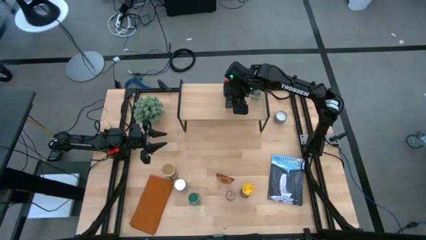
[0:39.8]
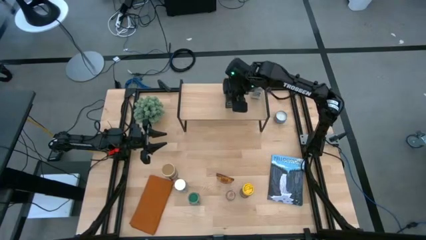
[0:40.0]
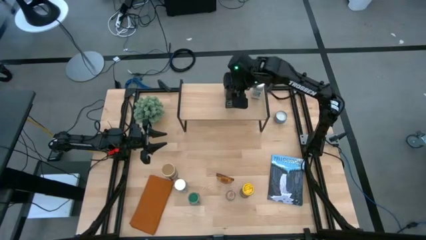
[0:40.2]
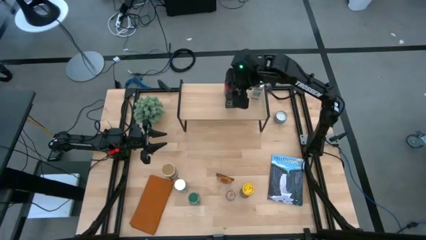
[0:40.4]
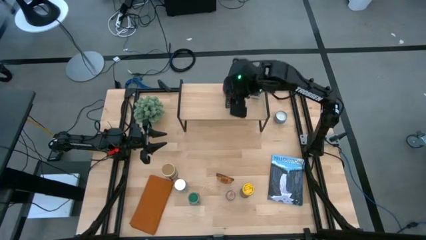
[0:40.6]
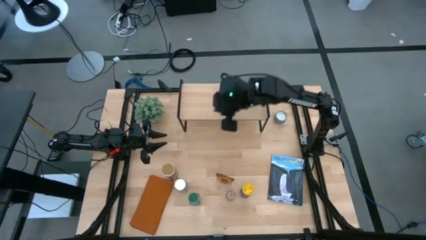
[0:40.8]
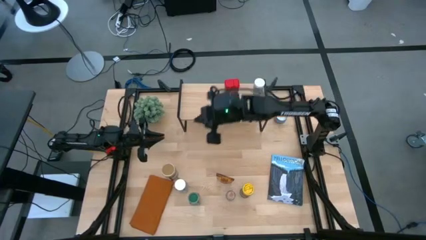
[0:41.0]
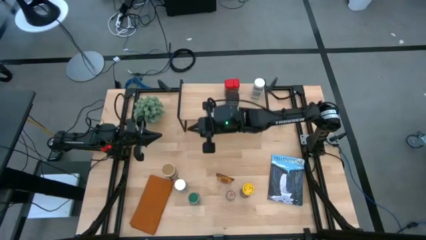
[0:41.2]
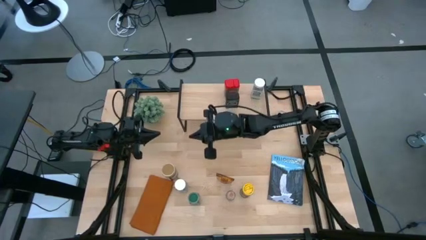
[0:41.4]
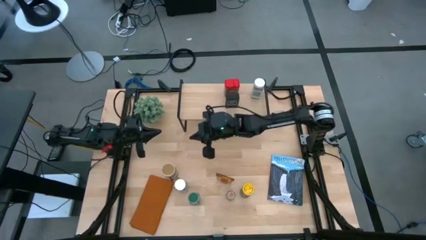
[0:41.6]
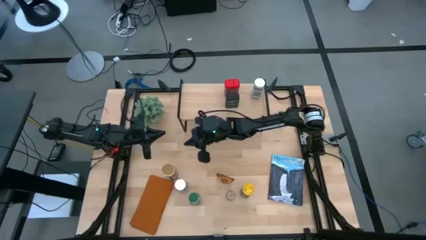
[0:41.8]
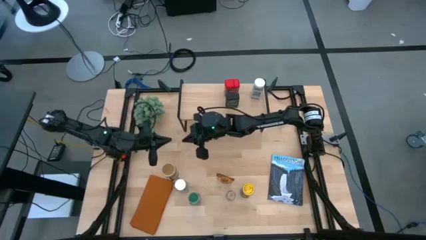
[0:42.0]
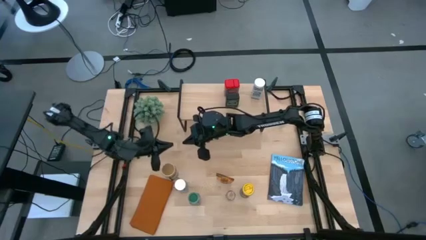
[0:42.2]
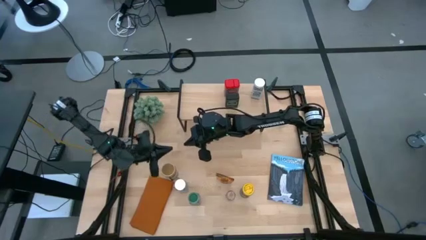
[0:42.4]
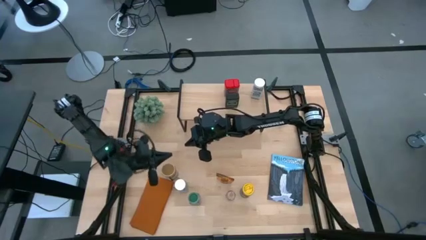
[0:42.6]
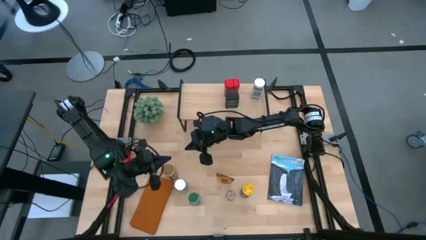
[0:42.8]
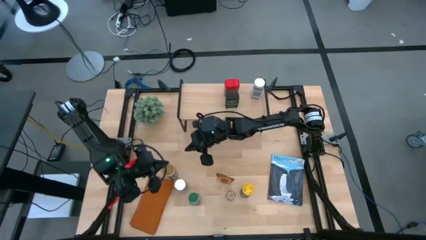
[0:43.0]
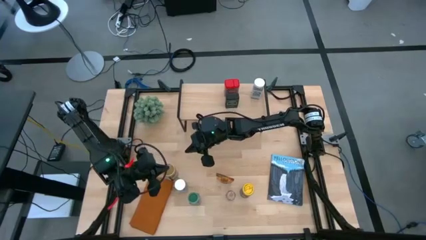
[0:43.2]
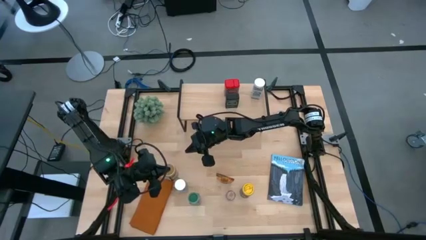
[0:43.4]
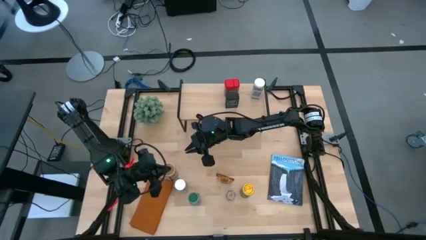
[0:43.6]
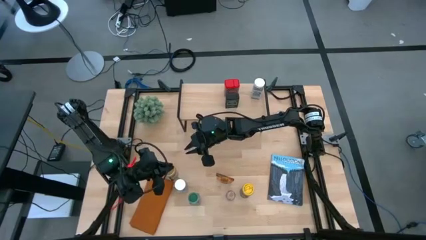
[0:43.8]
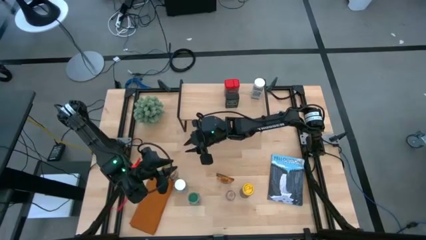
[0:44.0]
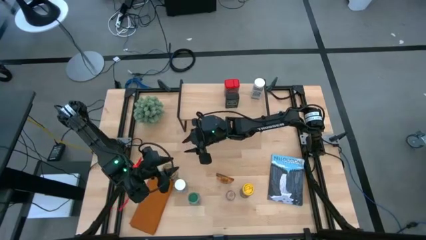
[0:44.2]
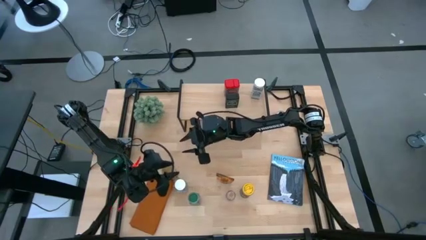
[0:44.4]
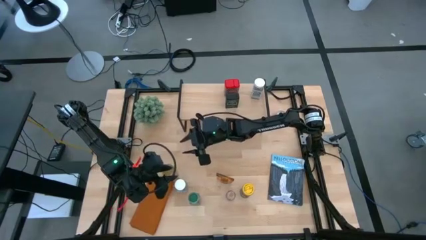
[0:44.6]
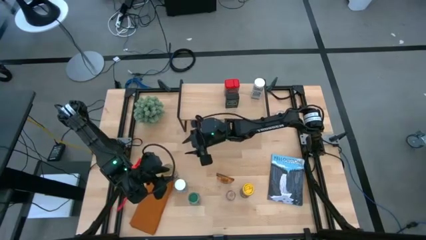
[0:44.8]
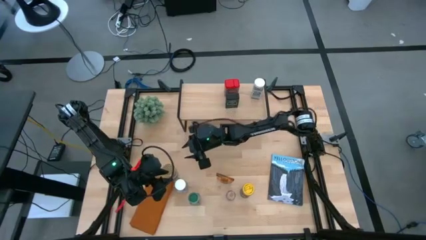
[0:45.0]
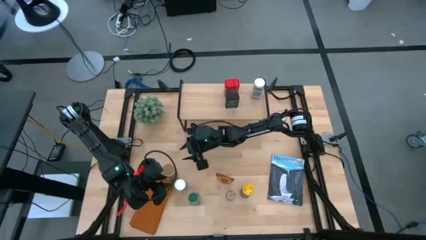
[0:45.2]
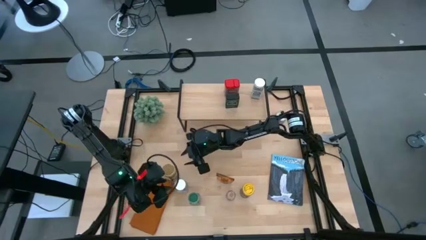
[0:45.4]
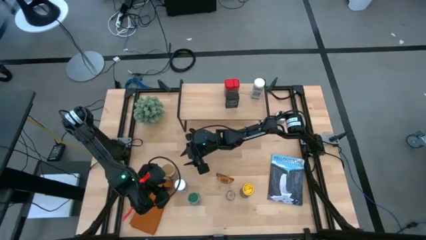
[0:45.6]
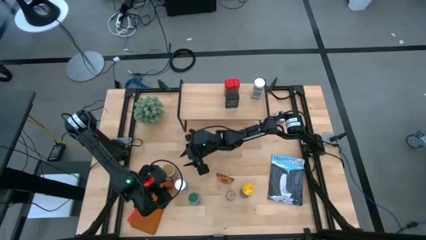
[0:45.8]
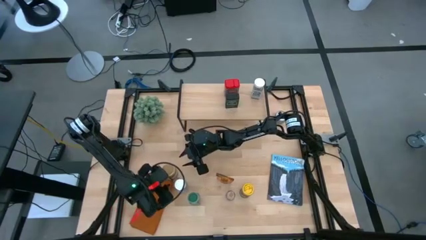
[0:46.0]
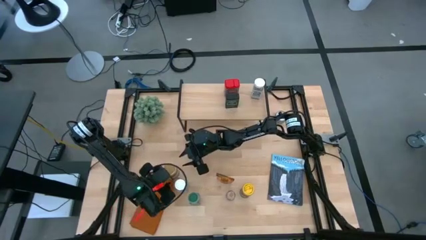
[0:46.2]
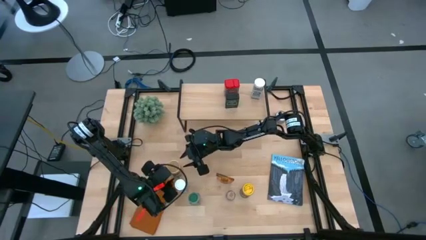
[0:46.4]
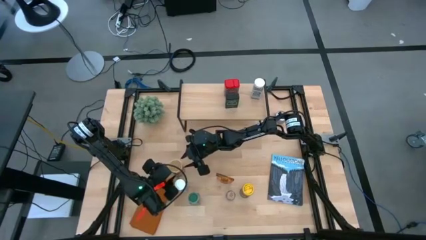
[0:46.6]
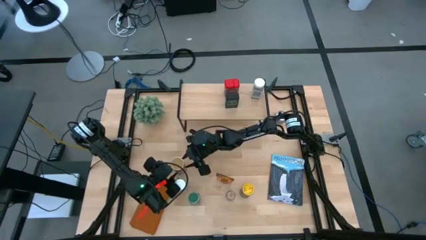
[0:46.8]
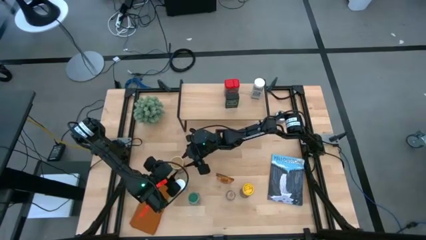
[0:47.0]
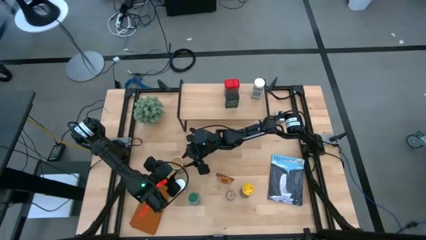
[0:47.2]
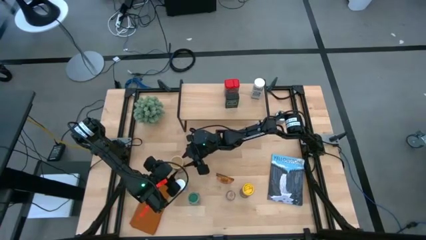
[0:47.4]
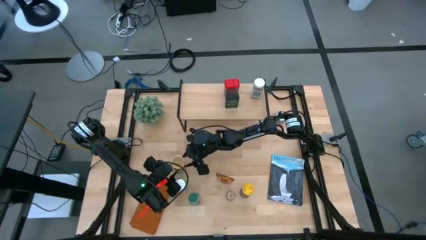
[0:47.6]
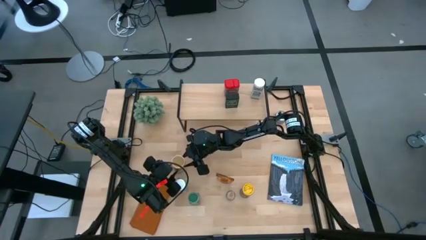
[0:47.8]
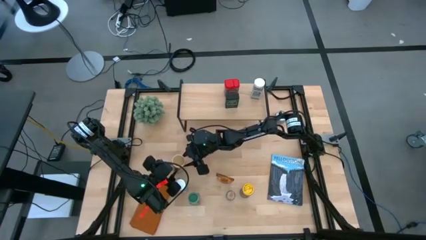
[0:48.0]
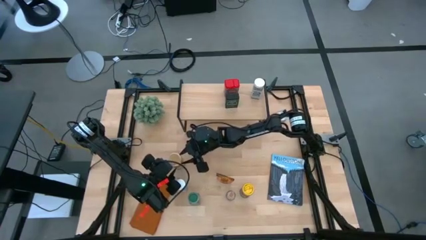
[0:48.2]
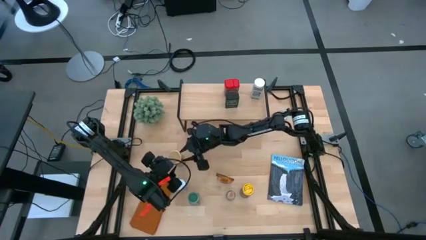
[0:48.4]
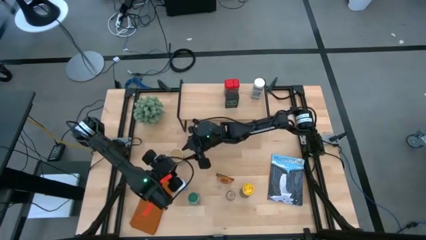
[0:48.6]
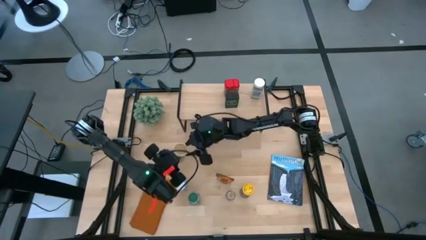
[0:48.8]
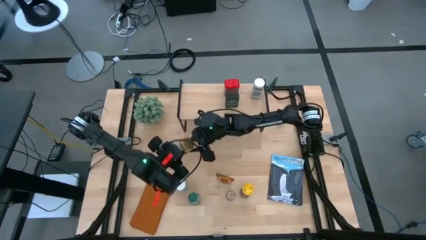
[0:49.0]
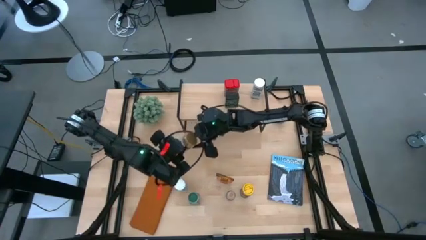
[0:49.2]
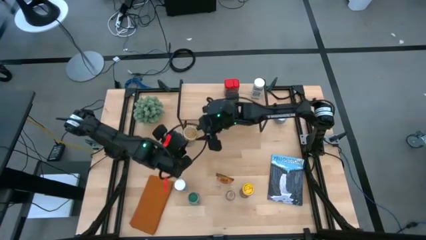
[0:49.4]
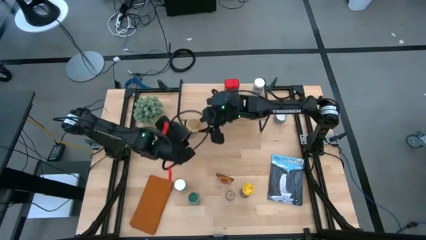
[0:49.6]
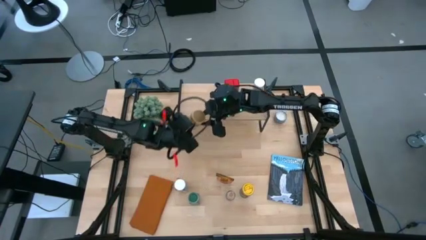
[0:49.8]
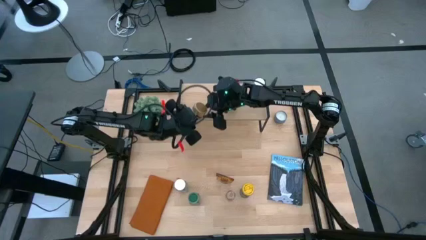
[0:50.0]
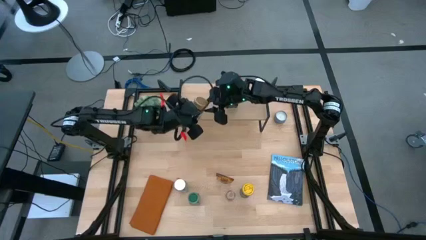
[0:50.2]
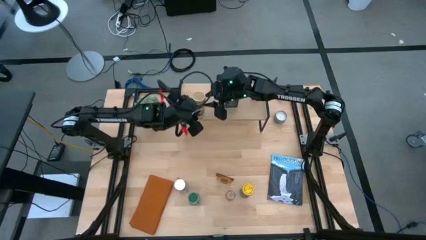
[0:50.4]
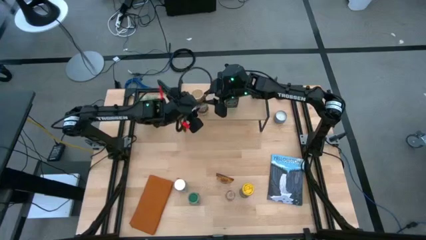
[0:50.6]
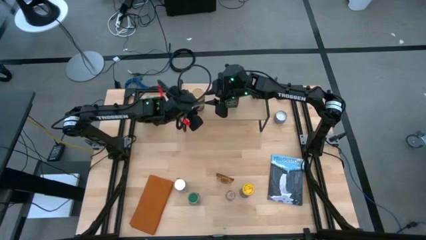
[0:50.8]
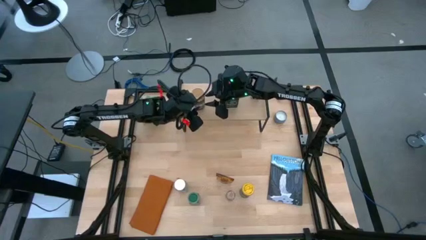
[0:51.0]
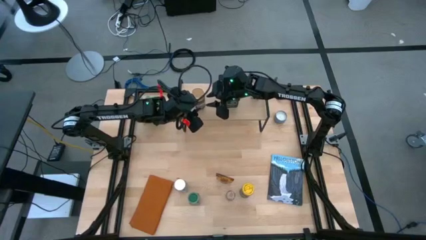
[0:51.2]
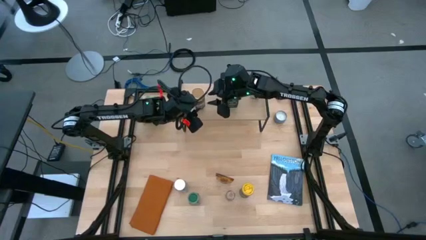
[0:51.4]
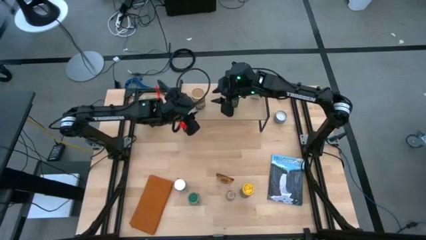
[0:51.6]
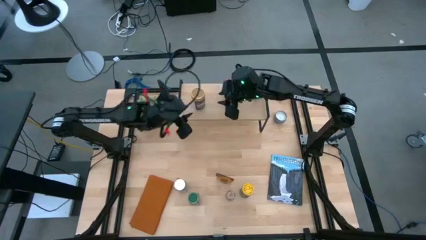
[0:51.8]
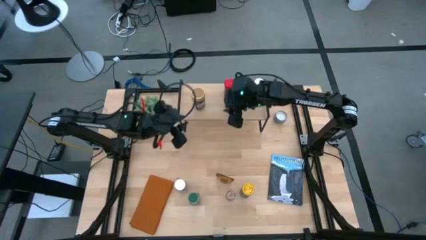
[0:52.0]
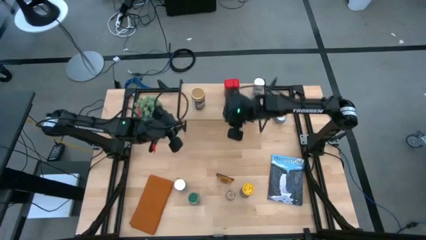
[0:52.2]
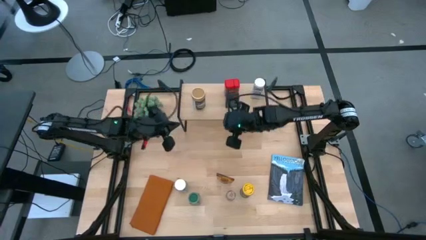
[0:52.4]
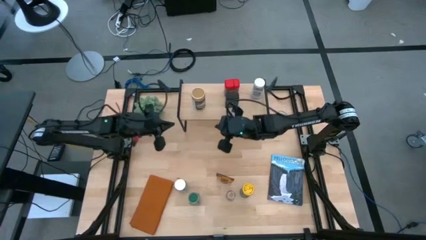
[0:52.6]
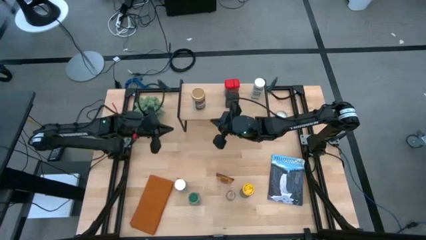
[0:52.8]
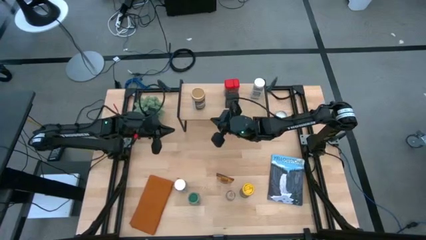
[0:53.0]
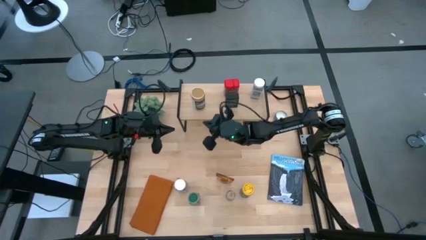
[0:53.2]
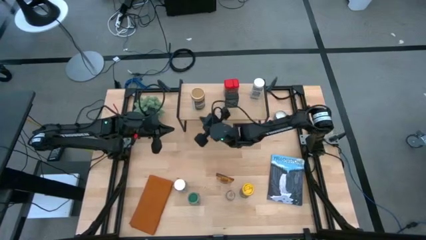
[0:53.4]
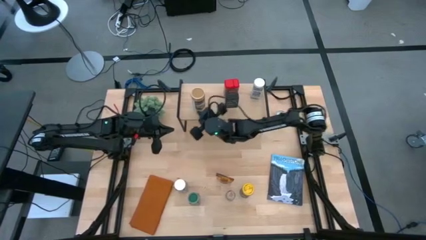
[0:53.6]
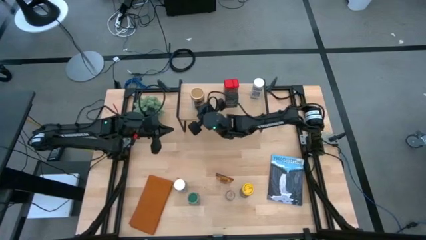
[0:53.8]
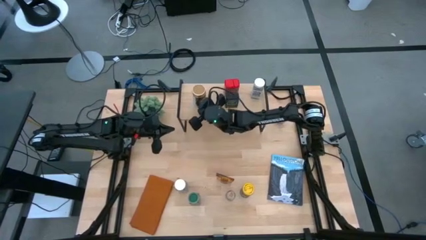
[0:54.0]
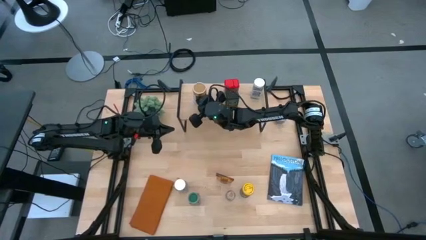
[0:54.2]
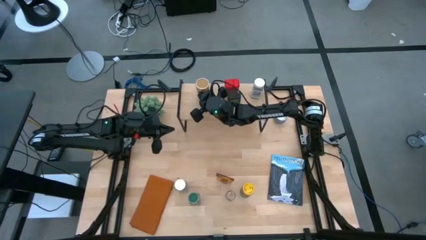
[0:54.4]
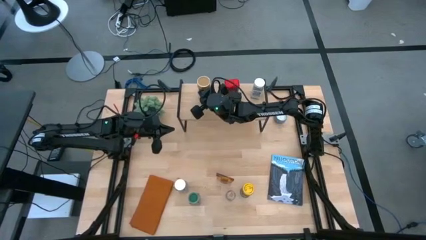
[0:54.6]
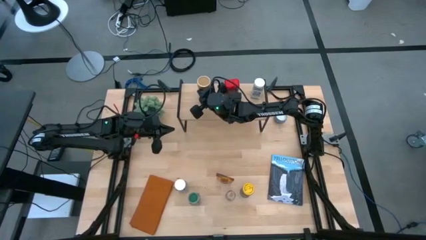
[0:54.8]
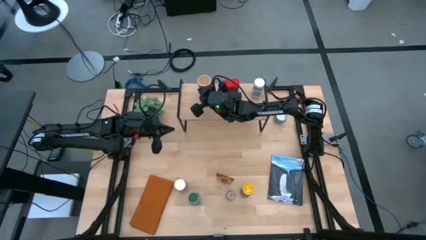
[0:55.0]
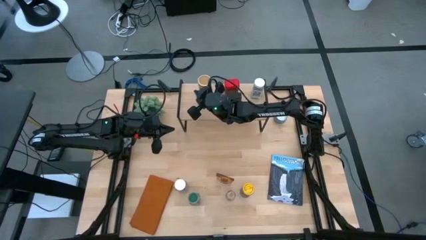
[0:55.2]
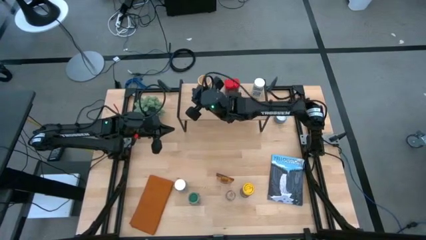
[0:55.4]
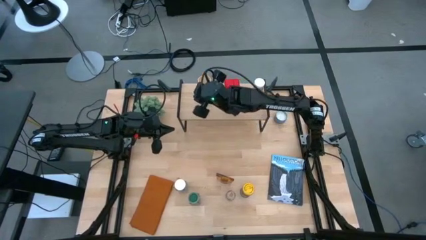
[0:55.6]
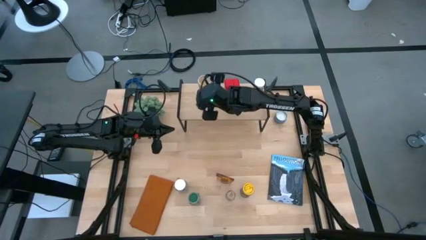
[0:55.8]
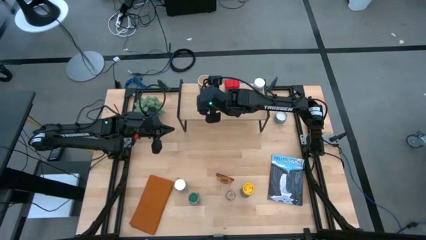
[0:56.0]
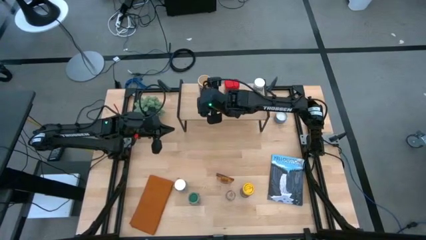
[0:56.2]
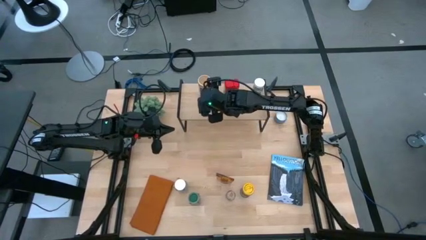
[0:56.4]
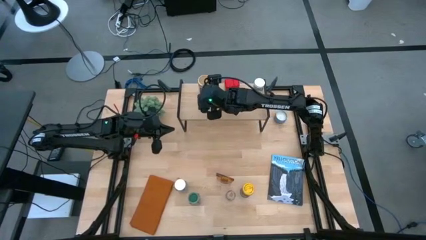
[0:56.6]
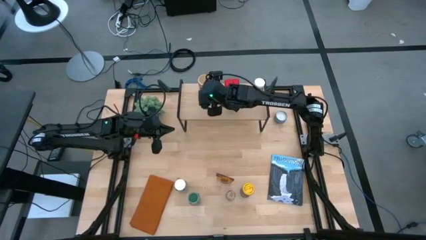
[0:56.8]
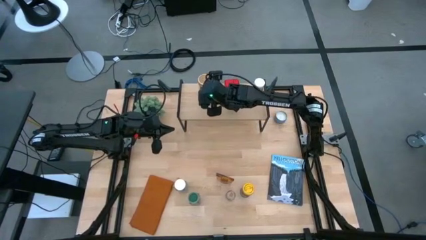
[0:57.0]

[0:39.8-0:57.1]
Task: Shelf spices
Put the golden seasoning bottle on the shelf
